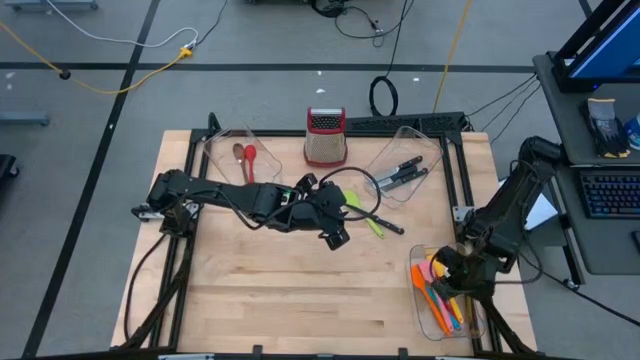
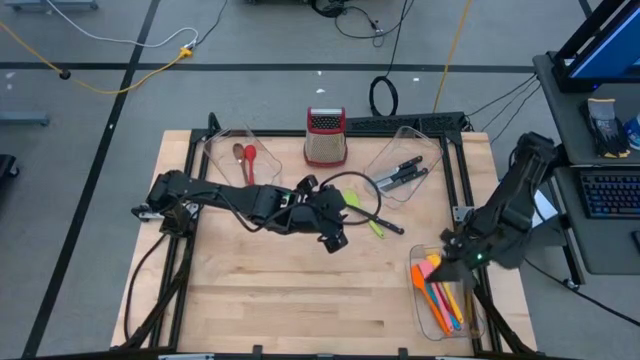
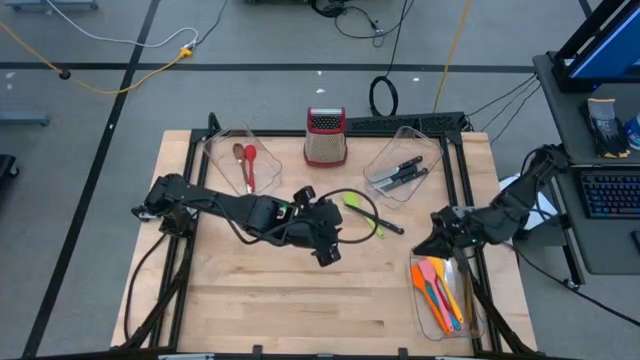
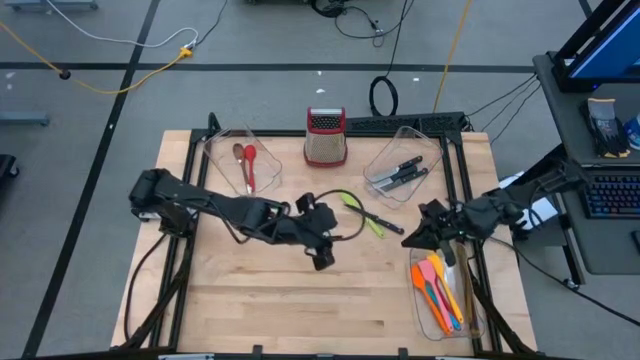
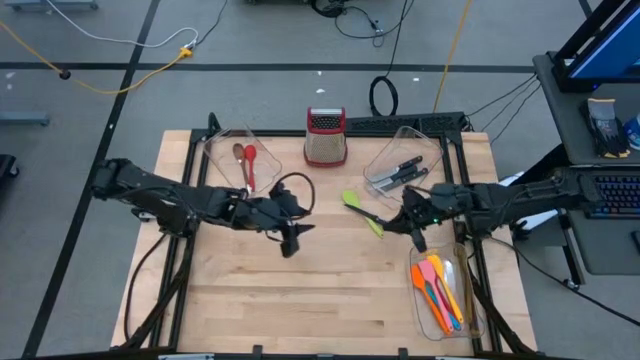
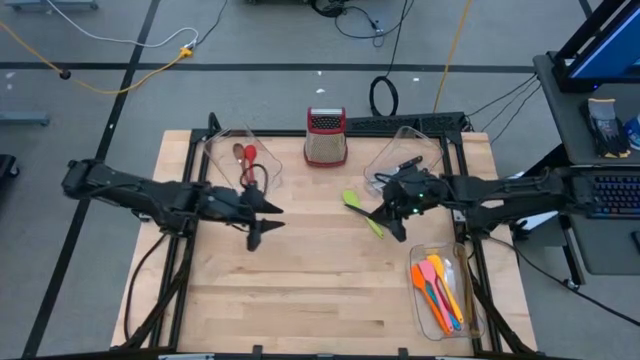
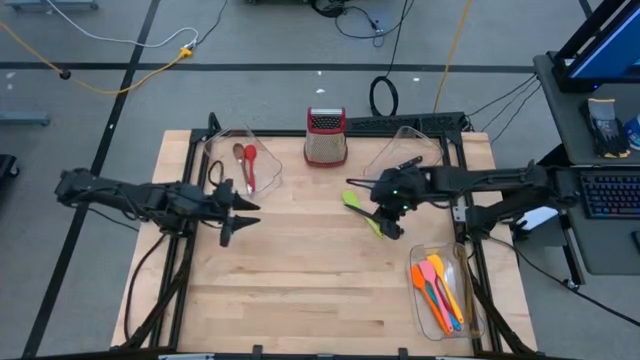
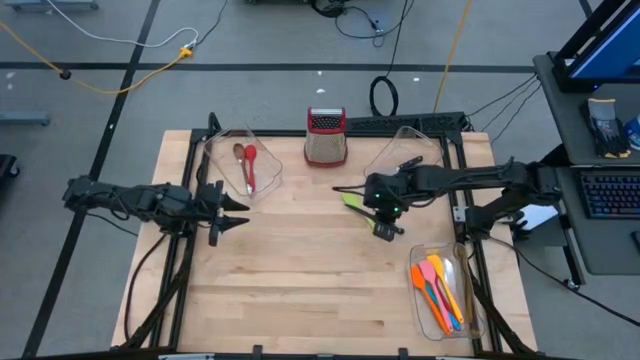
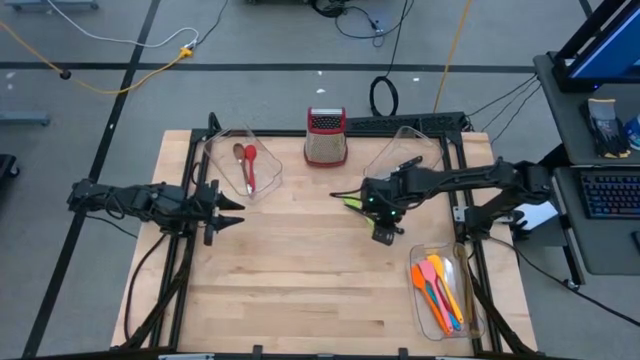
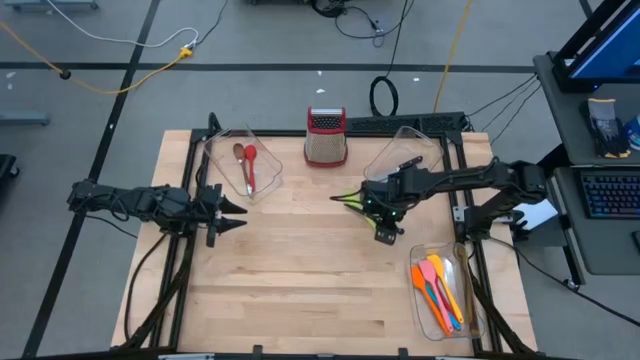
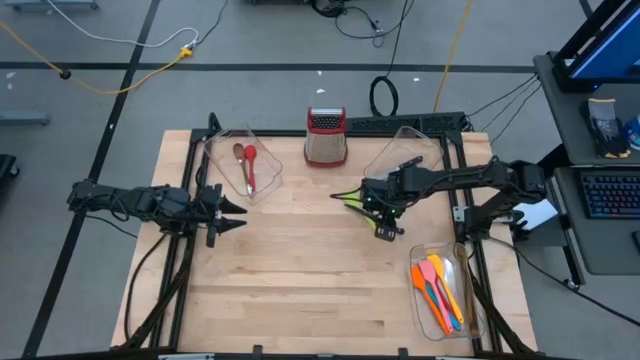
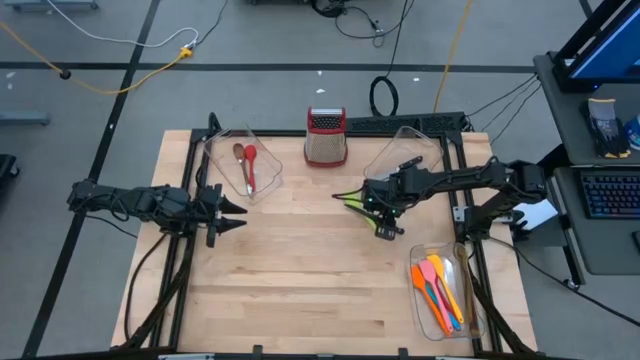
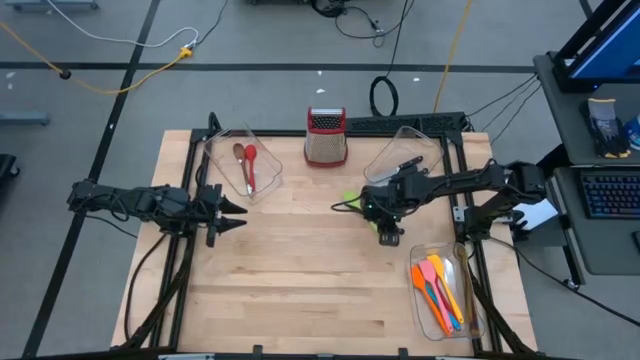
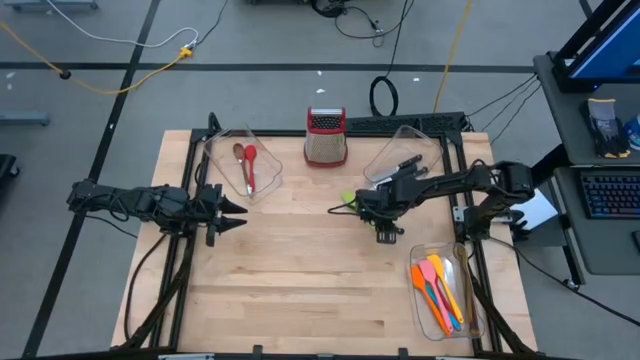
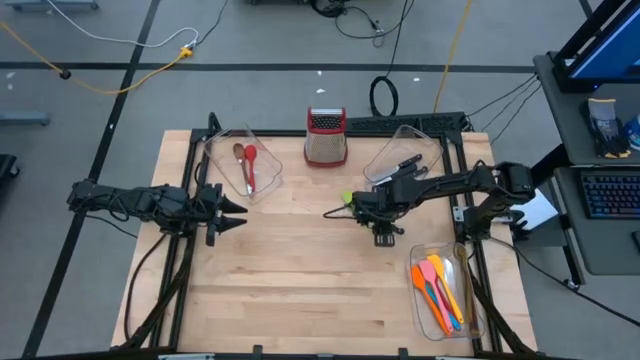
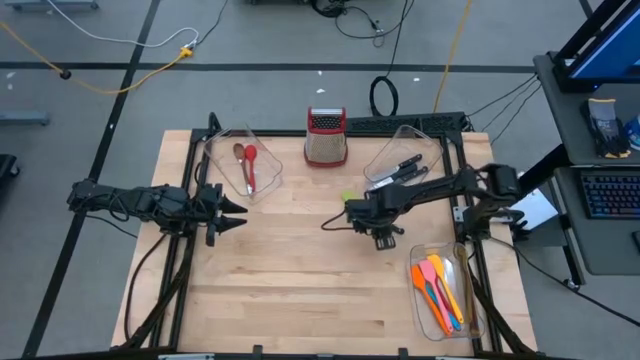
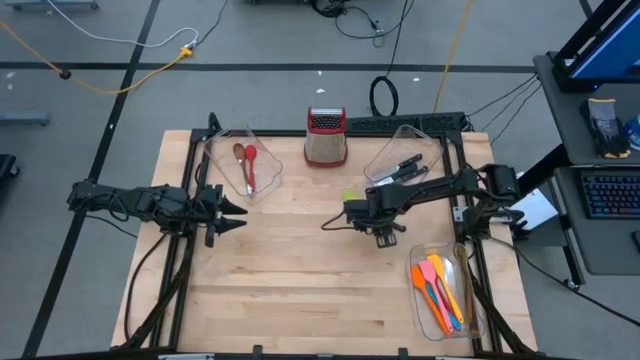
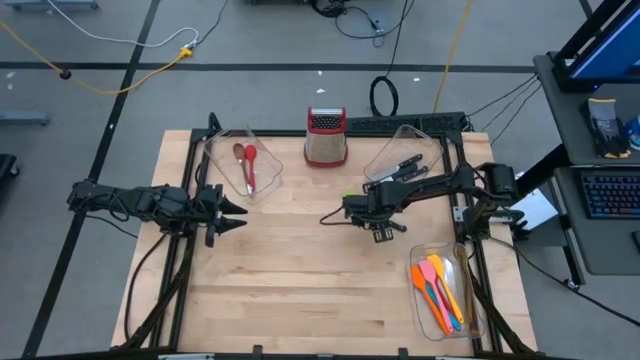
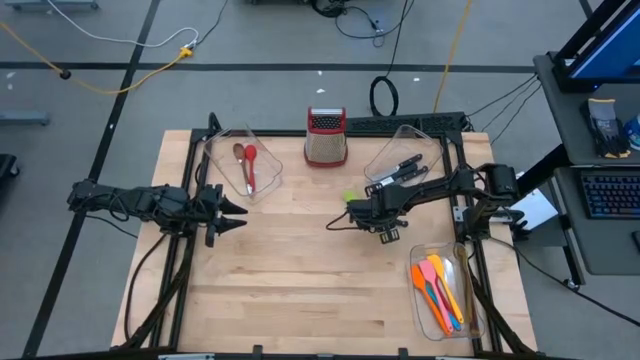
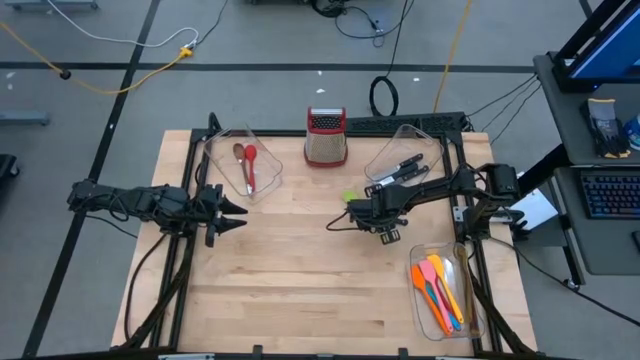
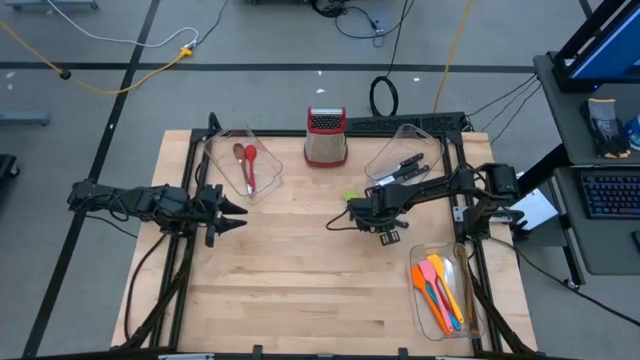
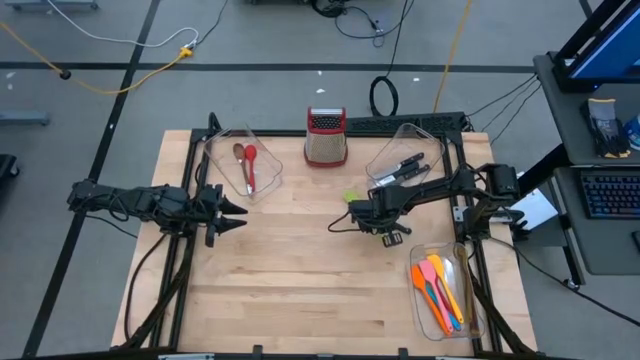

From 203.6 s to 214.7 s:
Task: Pick & Place Kitchen Items
Put the black kitchen knife into the top right transparent bin

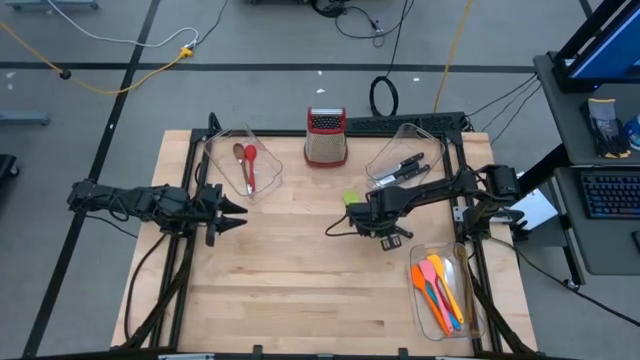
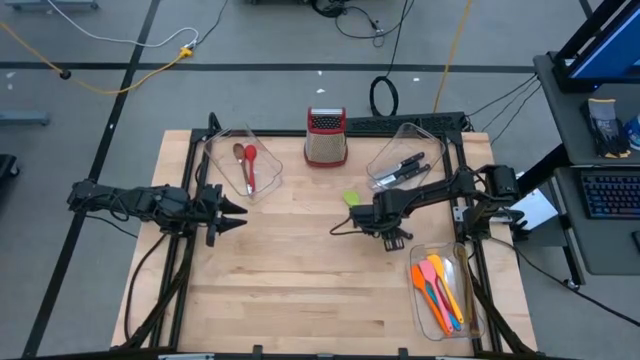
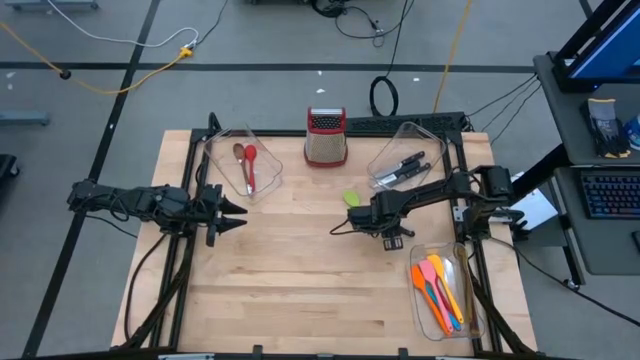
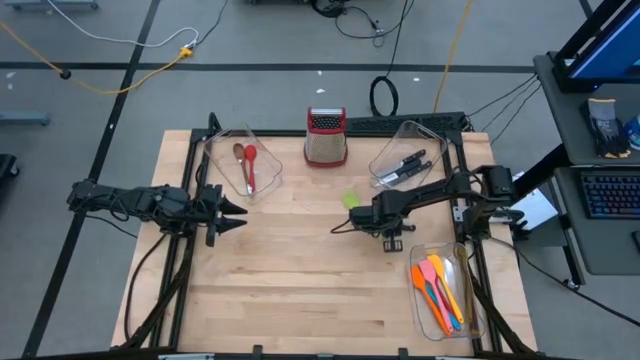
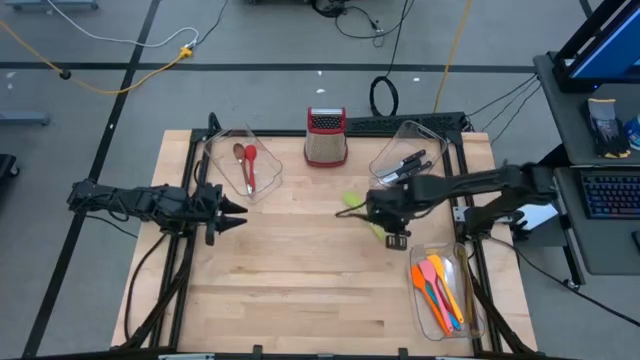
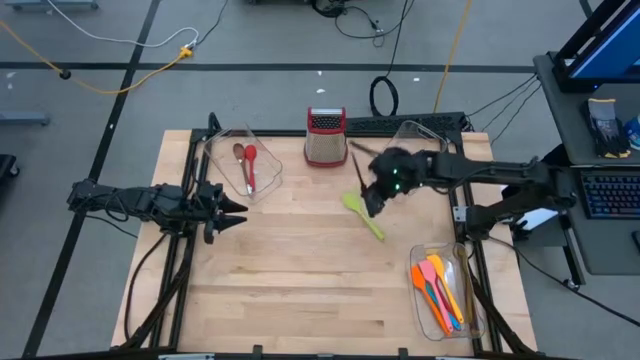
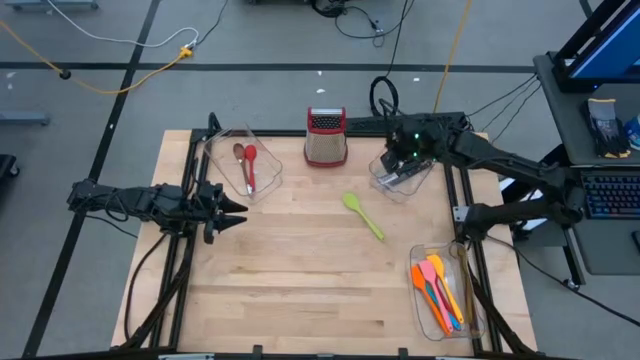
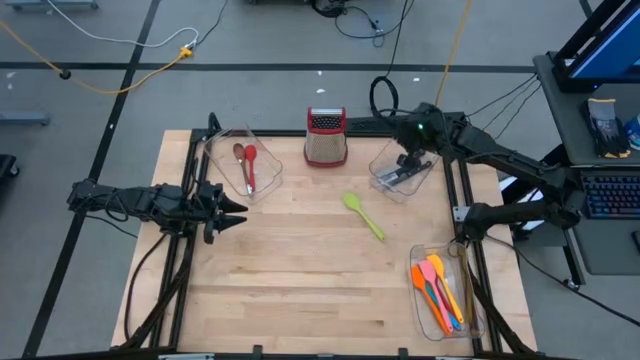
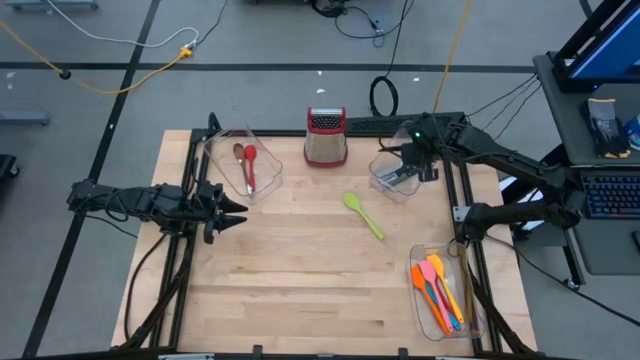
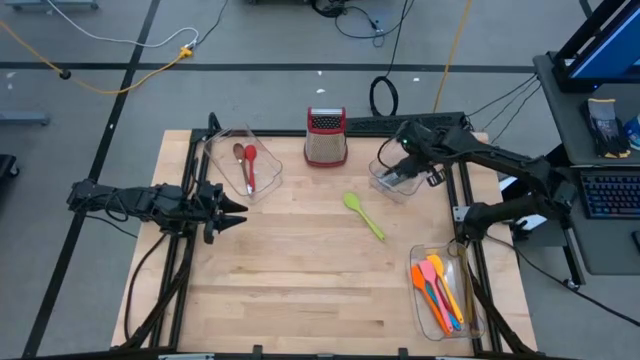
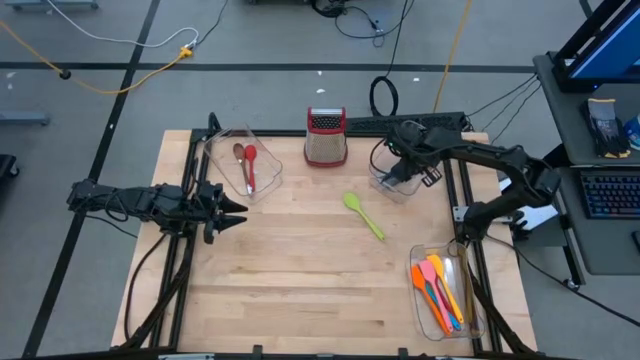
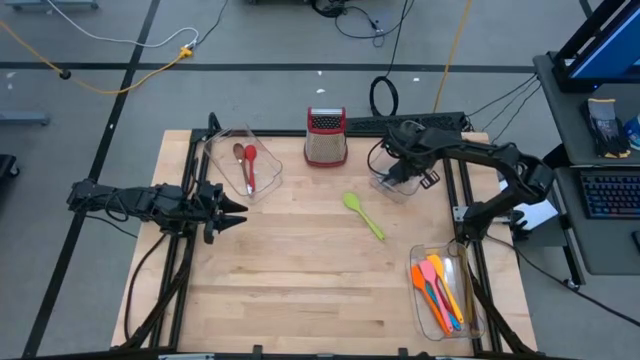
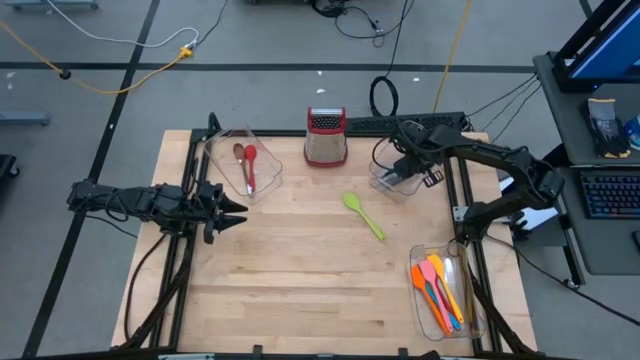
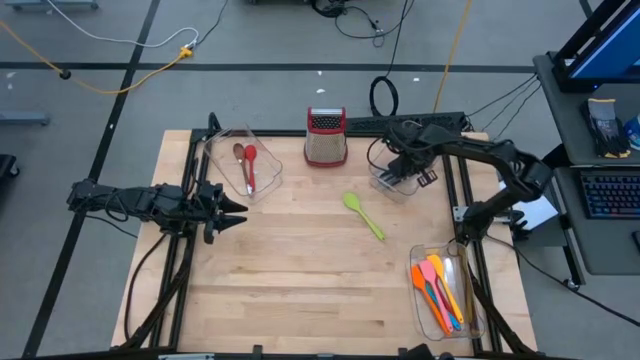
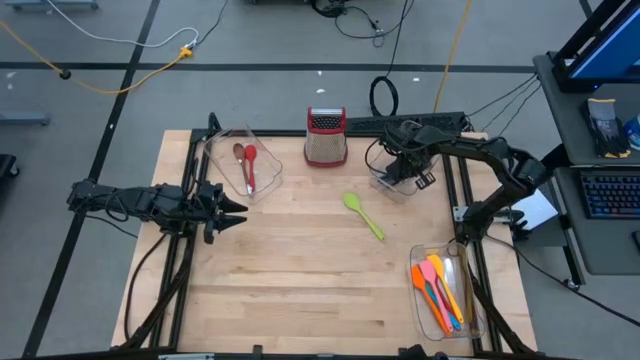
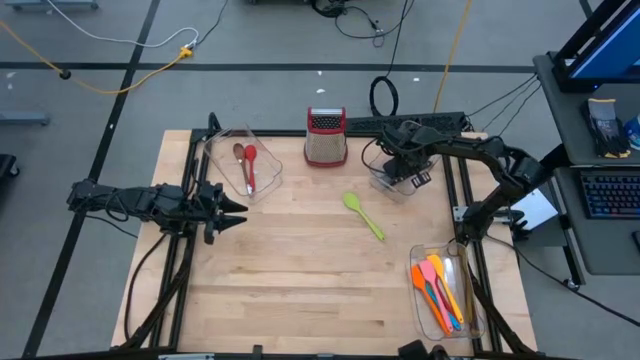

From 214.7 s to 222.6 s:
Put the black kitchen knife into the top right transparent bin

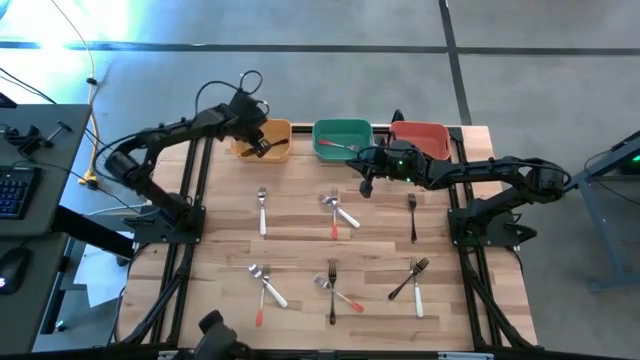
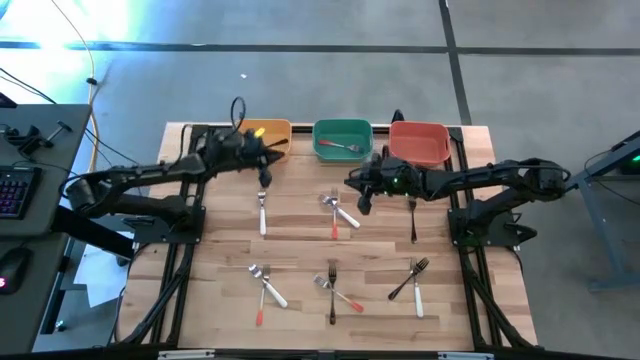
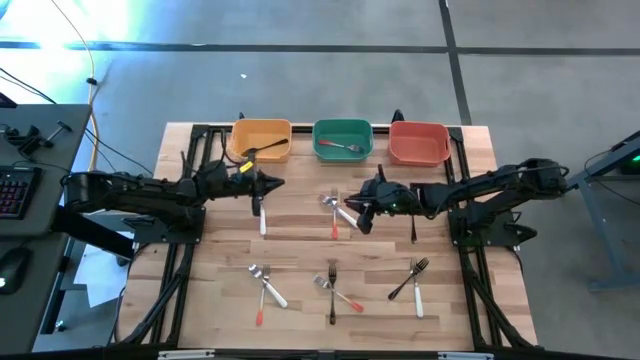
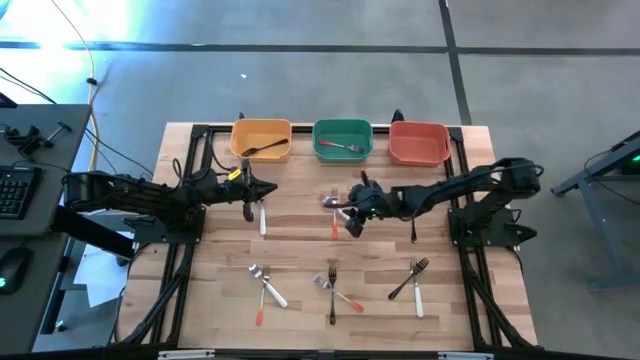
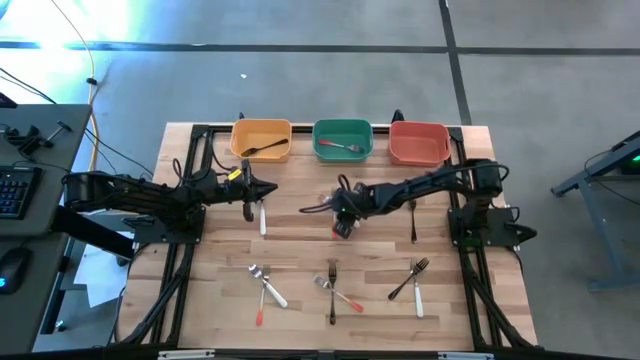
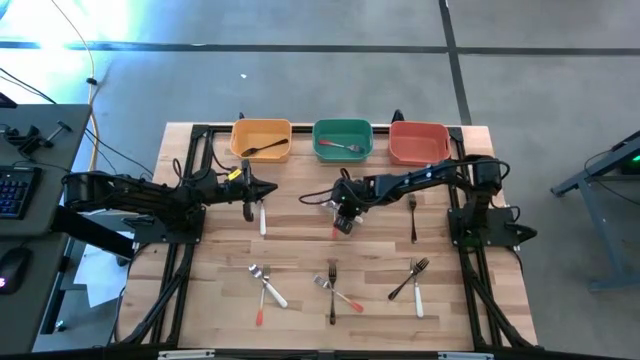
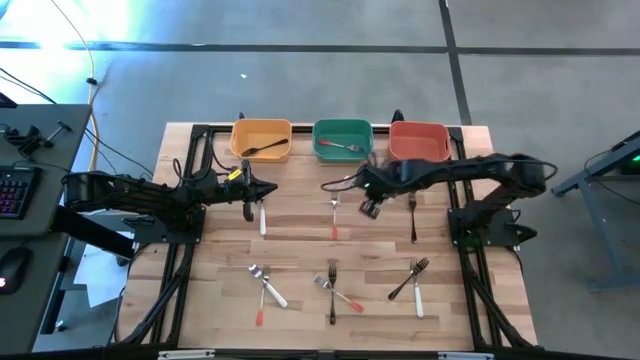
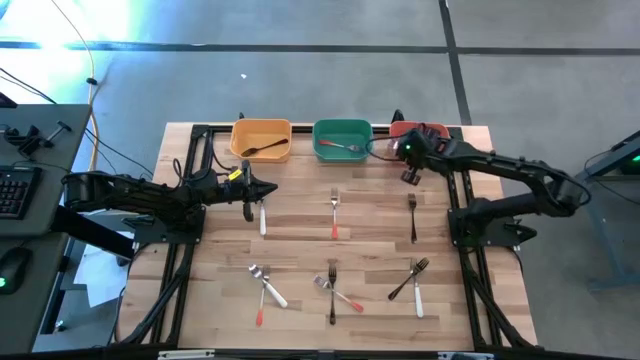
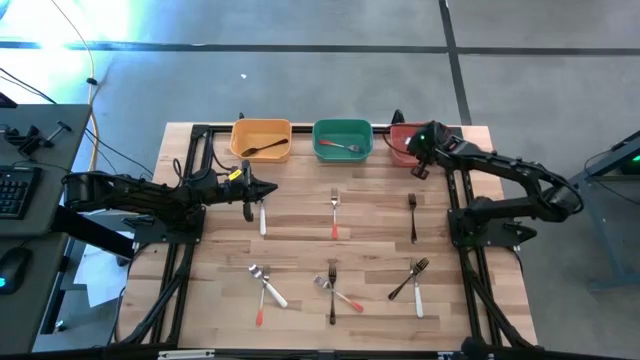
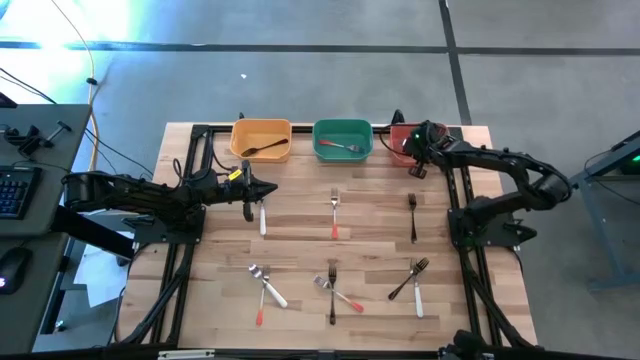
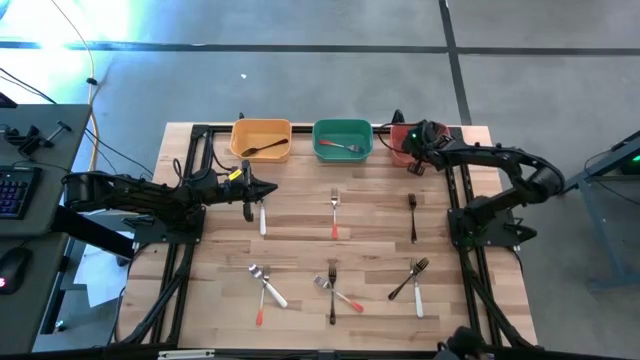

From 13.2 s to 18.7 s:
Task: Sort silverware by color (type)
Put the top right fork into the orange bin
